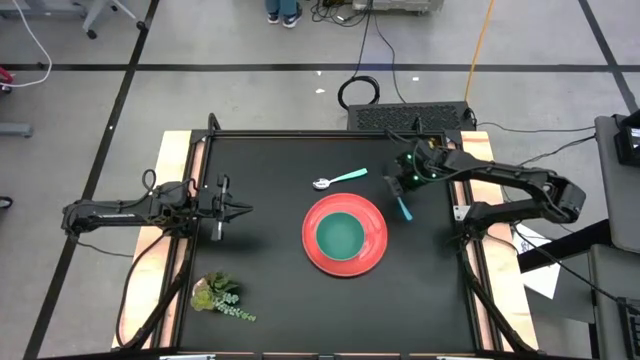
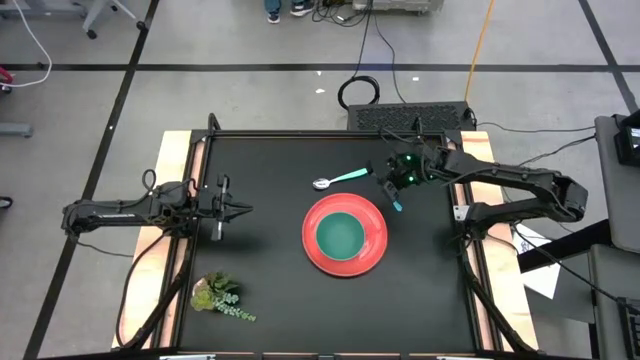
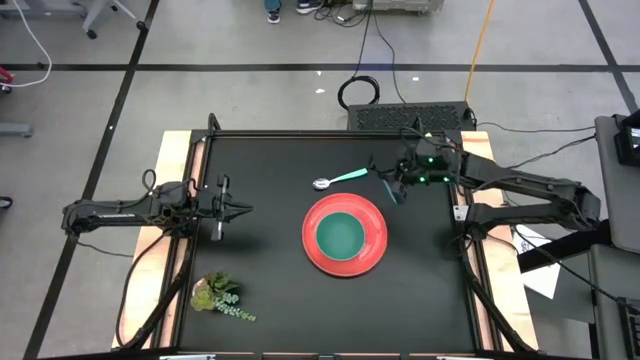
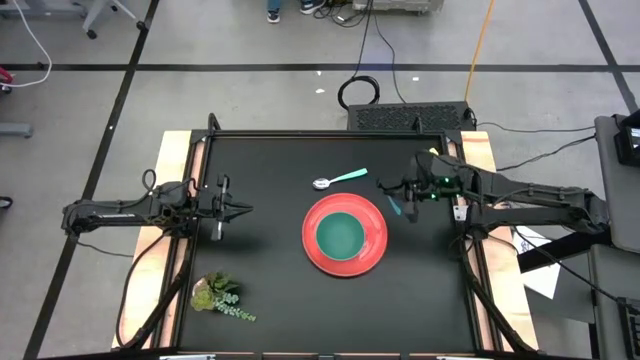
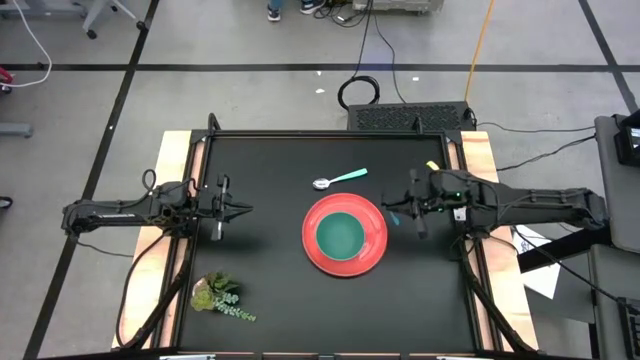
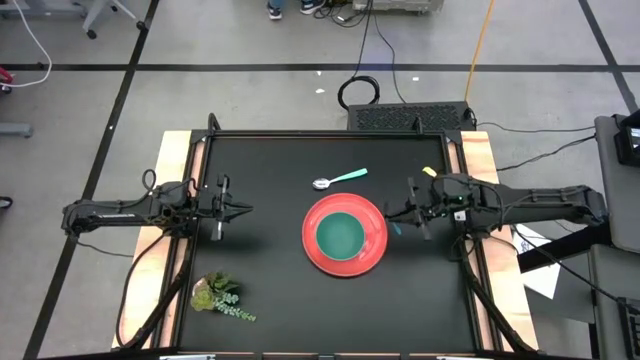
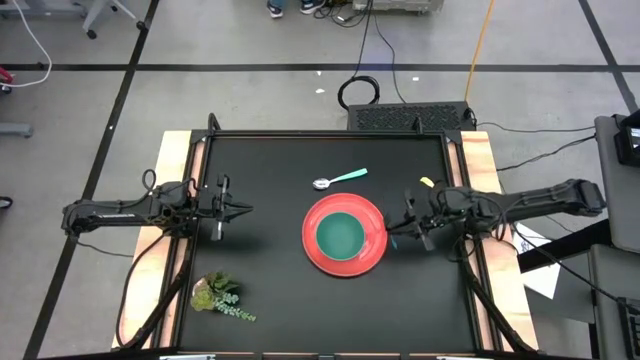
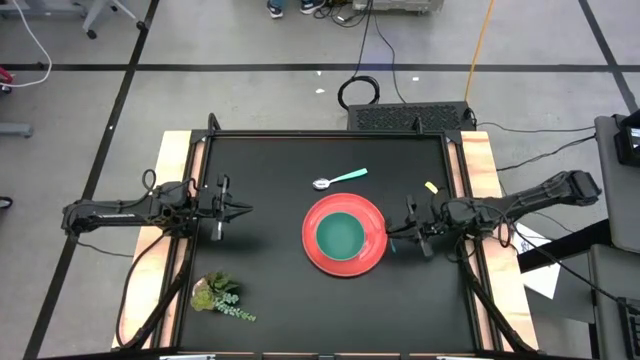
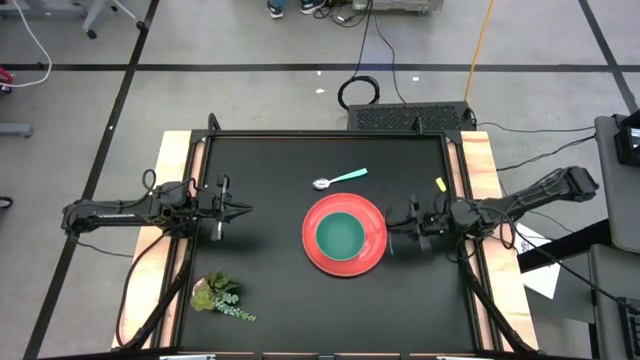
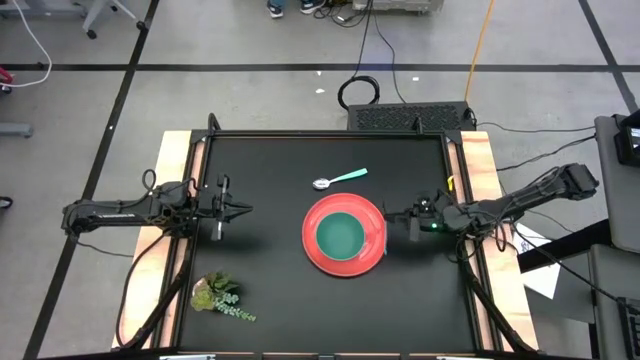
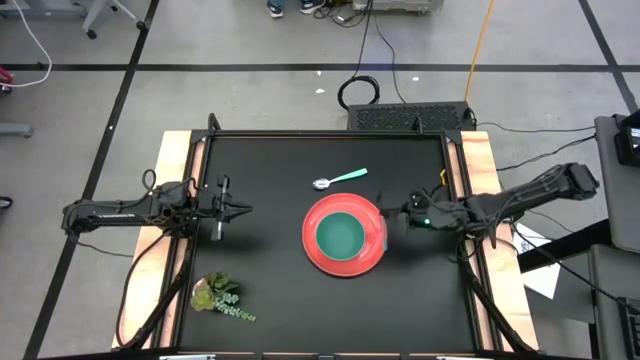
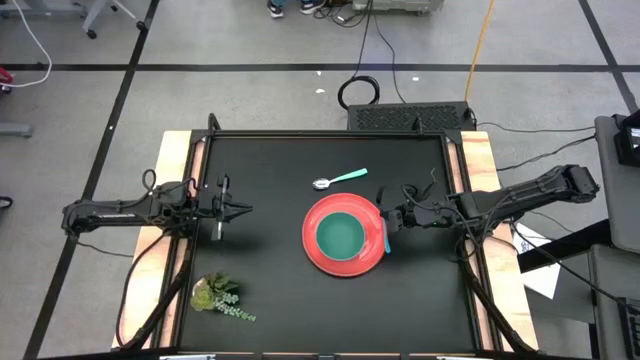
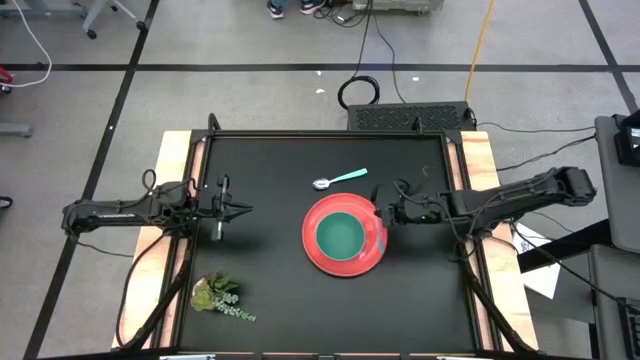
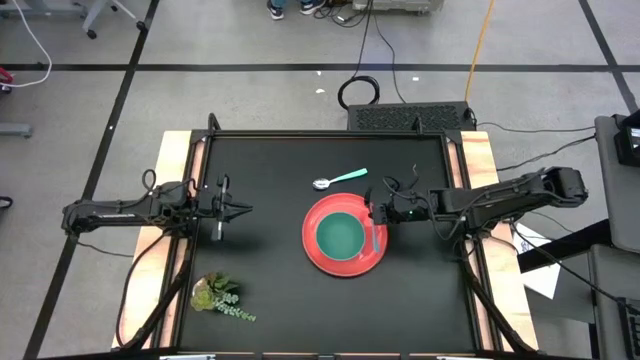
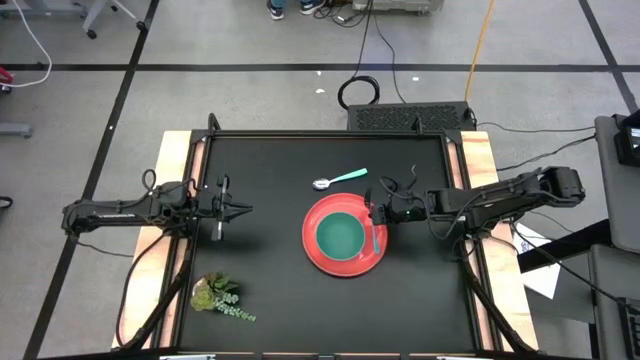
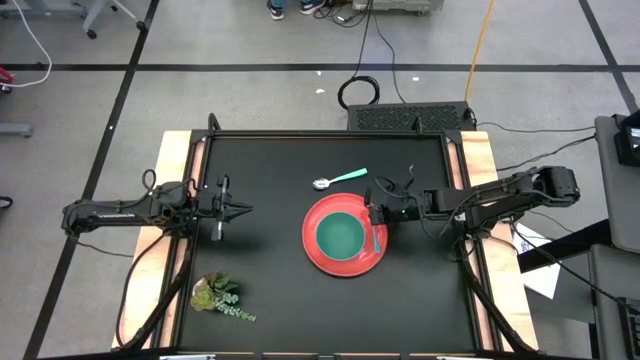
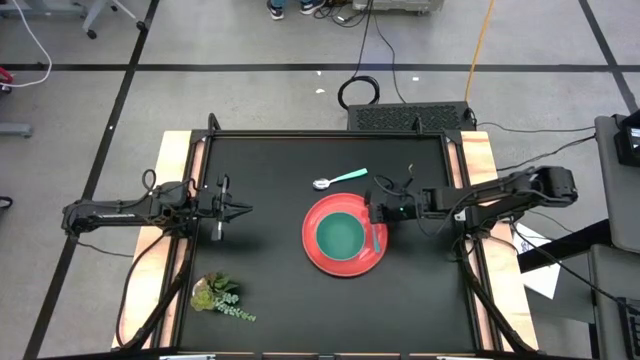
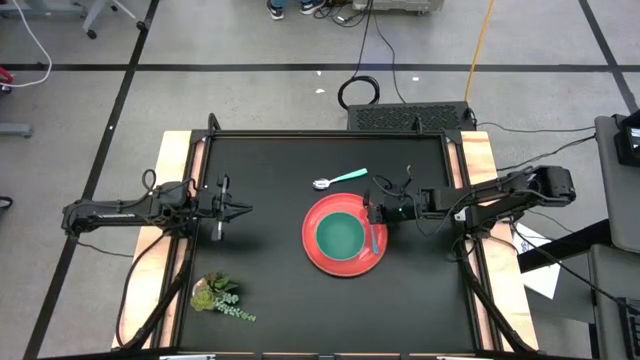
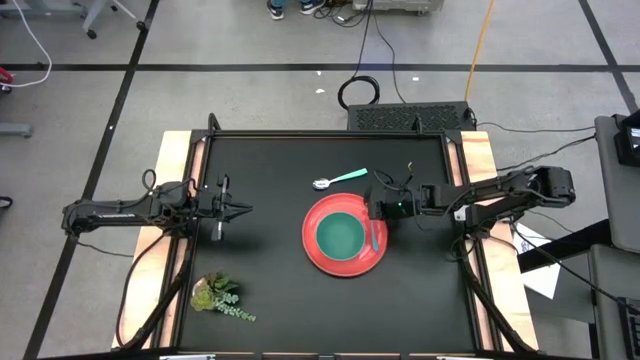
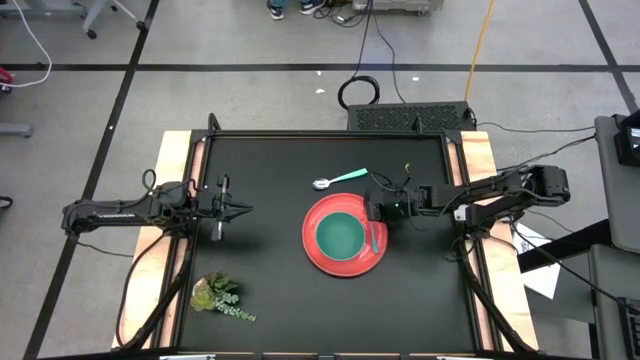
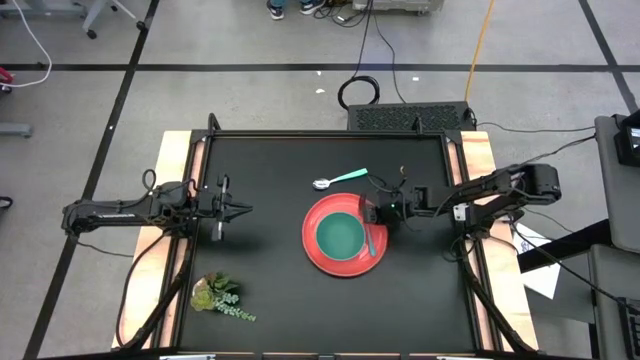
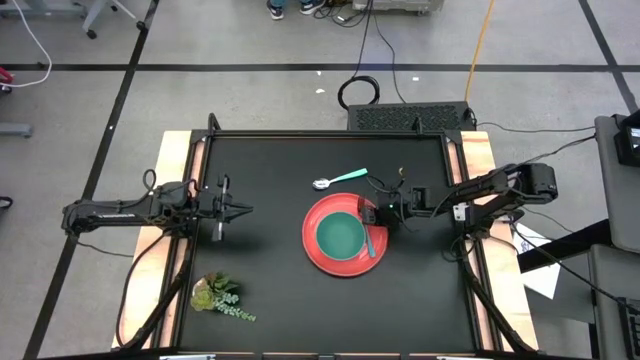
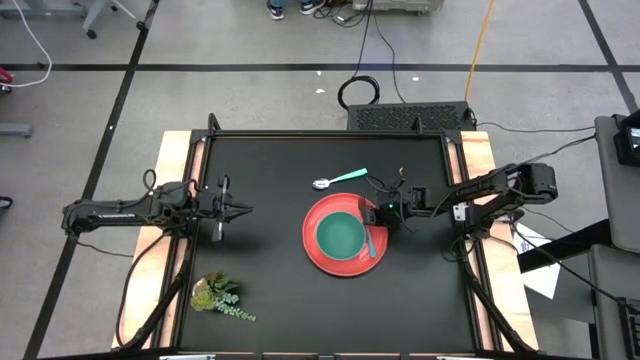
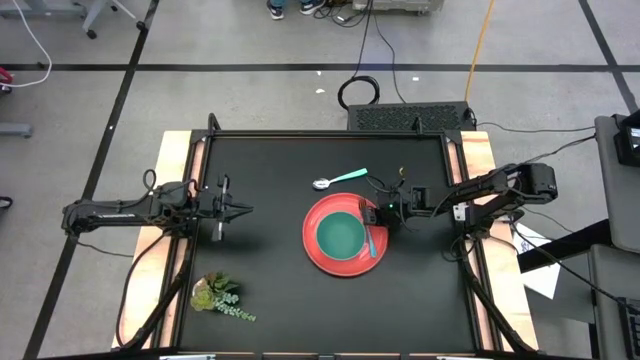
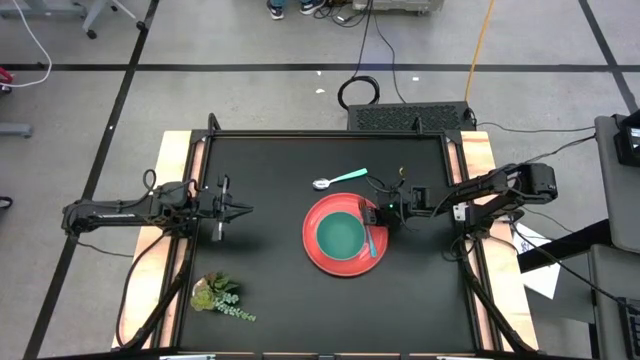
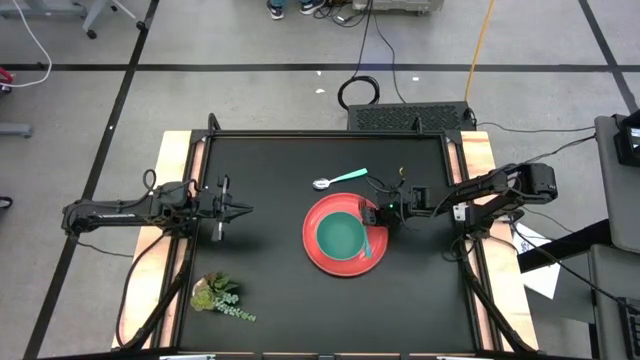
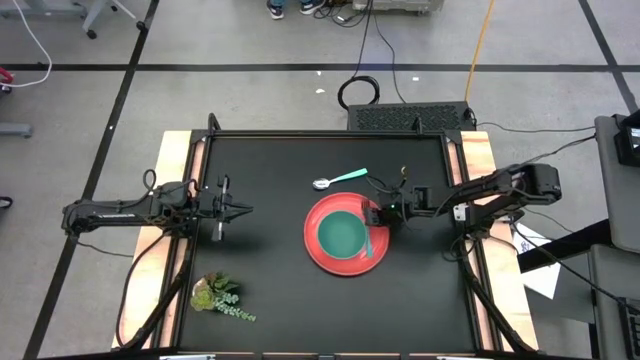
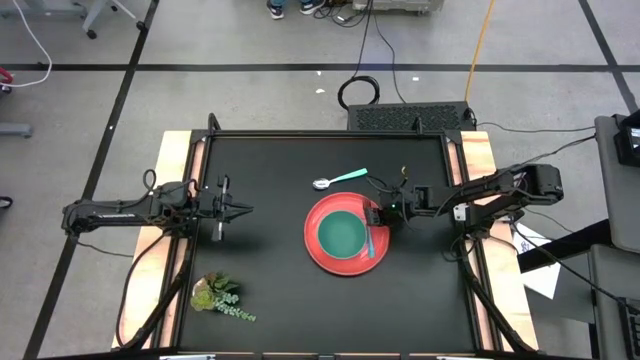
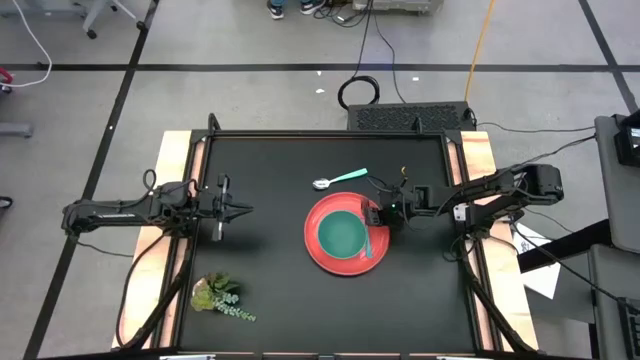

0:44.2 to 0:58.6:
Task: Set table place
Put the blue fork on the orange plate to the right of the green bowl

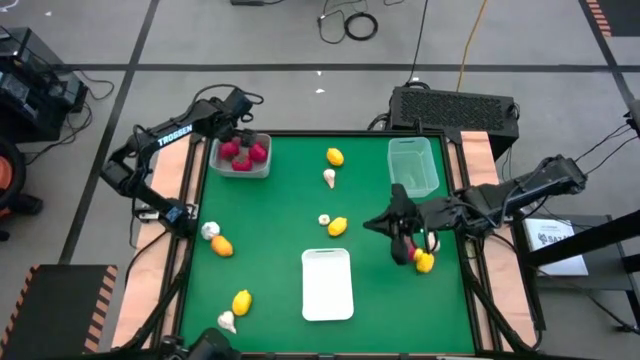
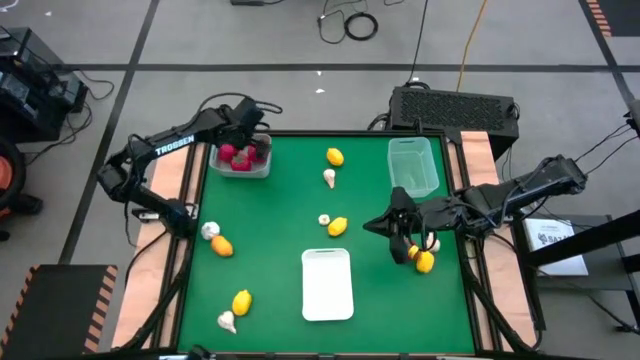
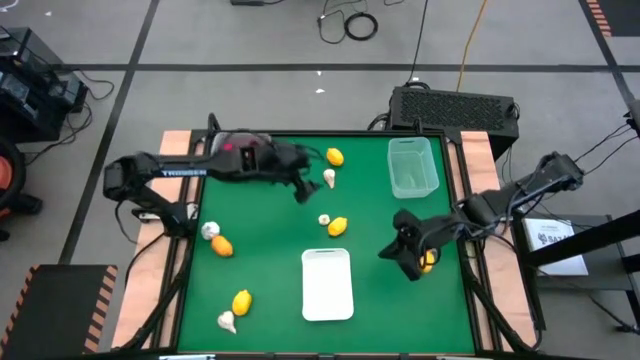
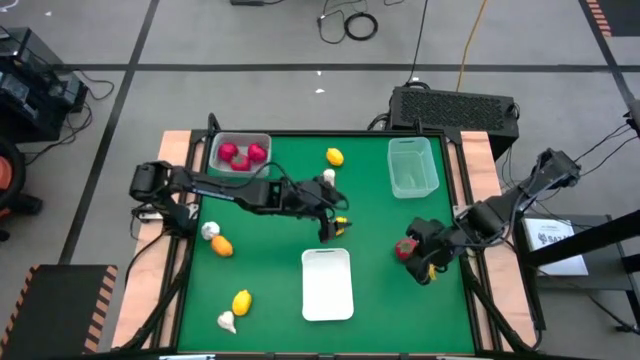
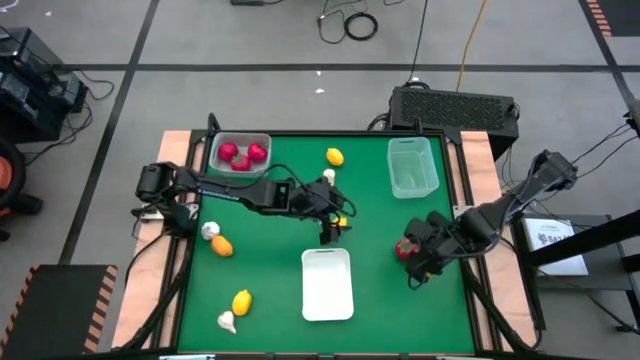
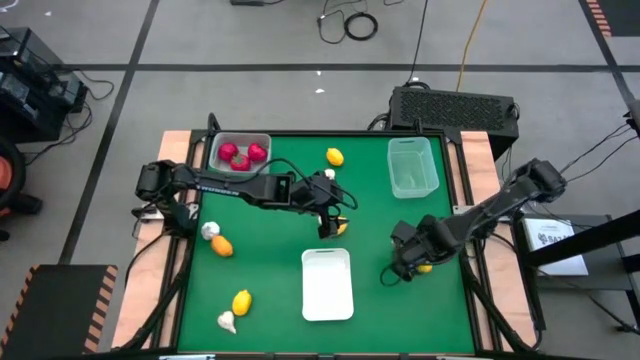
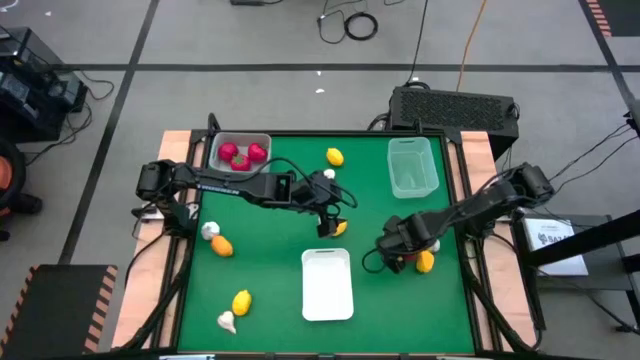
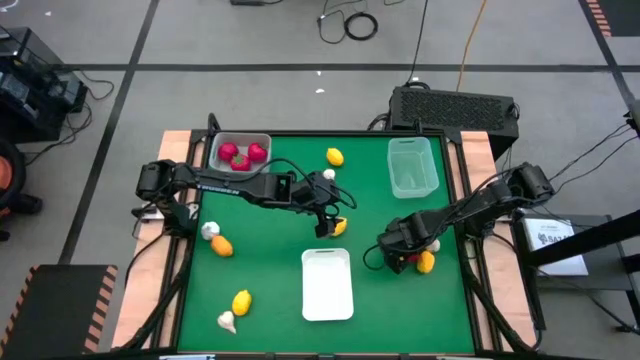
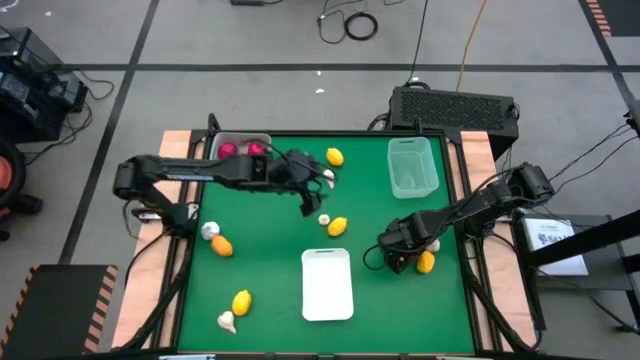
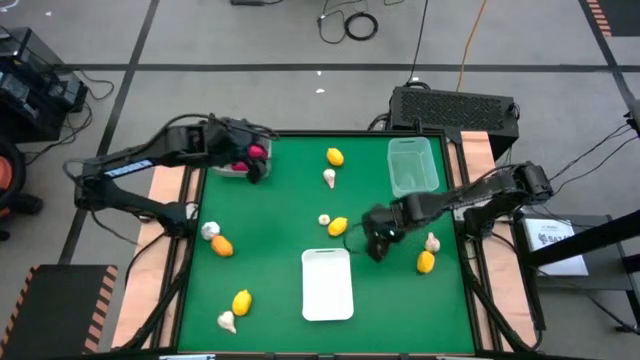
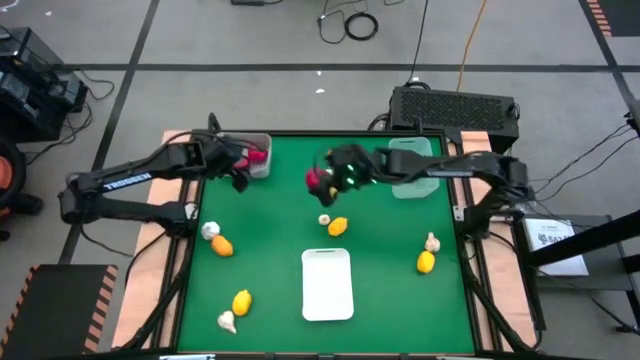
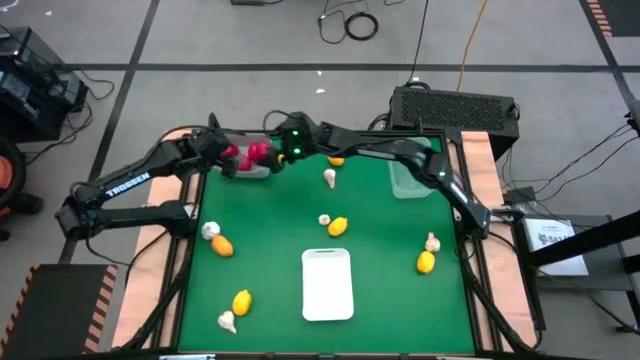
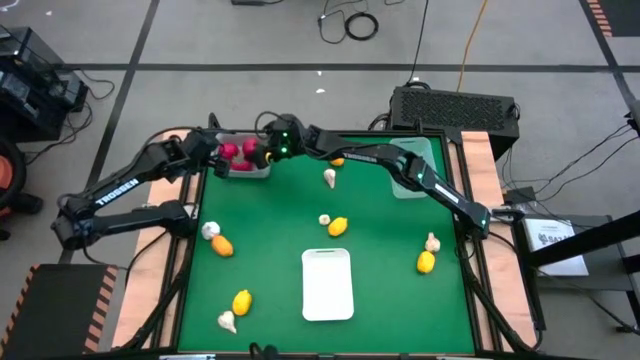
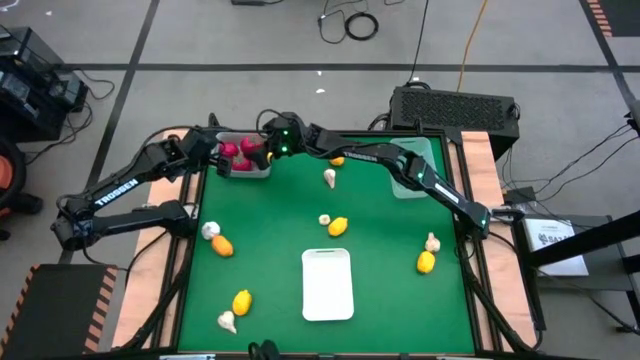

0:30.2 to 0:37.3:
Task: Sort produce into baskets
Put the tomato into the gray bin
